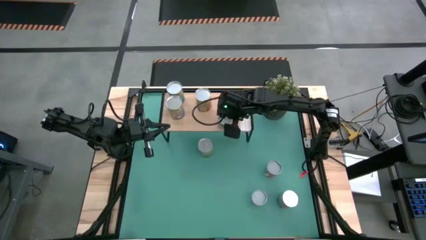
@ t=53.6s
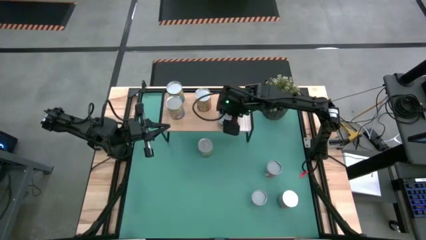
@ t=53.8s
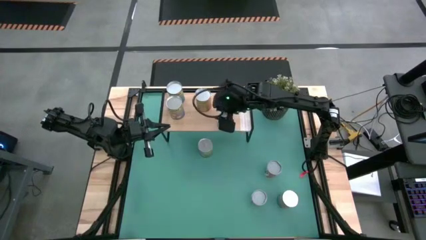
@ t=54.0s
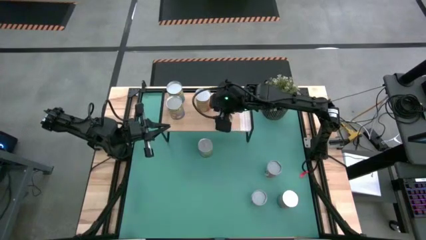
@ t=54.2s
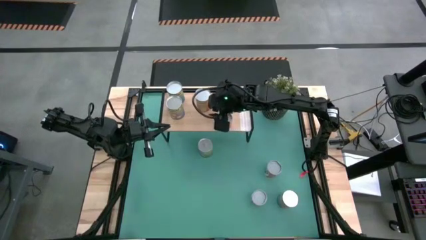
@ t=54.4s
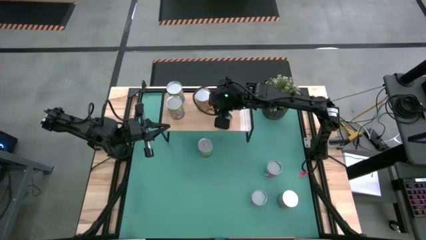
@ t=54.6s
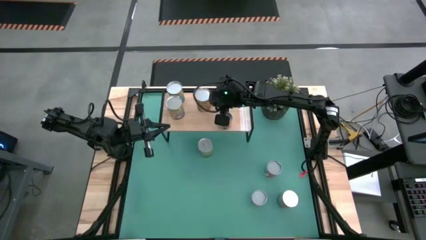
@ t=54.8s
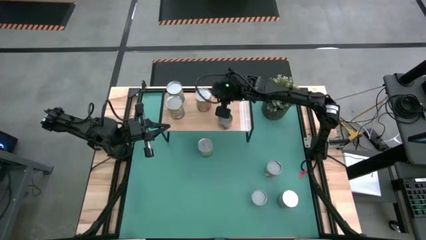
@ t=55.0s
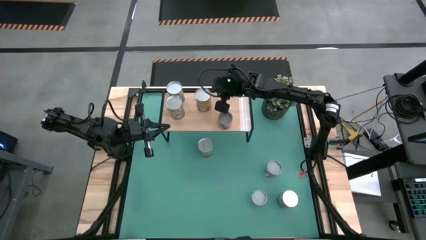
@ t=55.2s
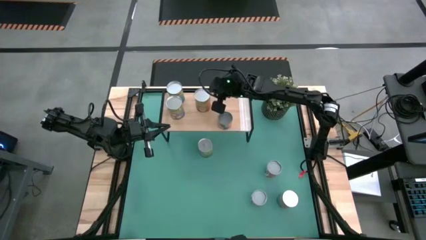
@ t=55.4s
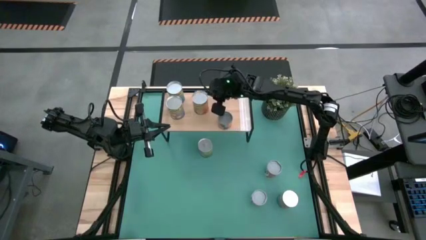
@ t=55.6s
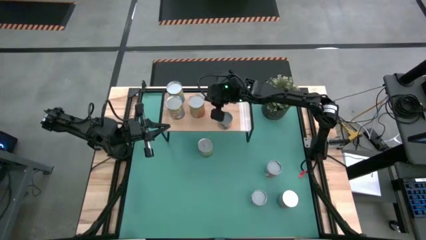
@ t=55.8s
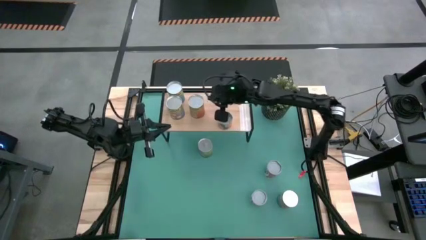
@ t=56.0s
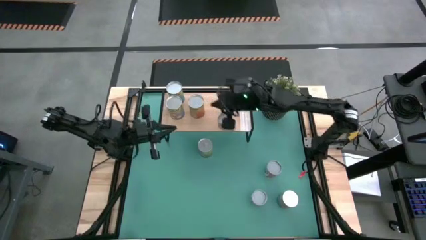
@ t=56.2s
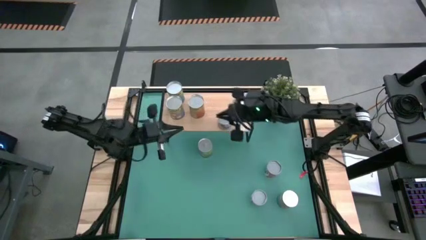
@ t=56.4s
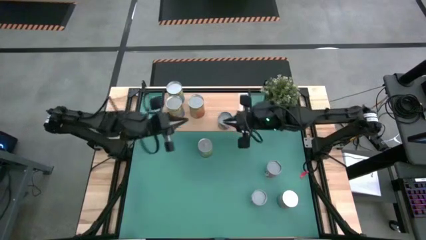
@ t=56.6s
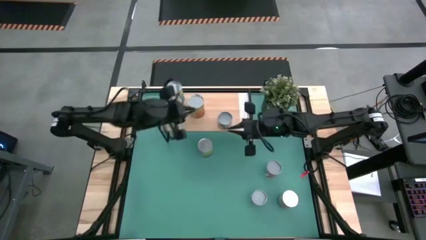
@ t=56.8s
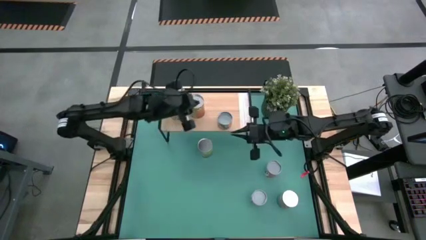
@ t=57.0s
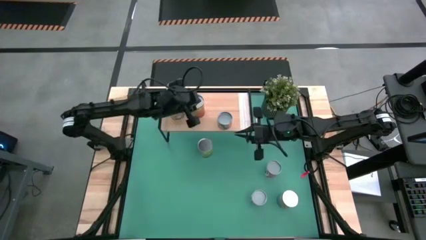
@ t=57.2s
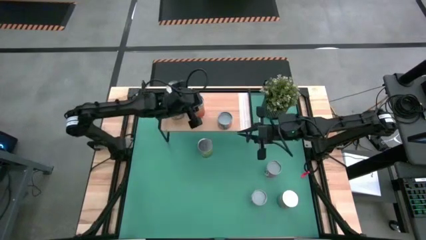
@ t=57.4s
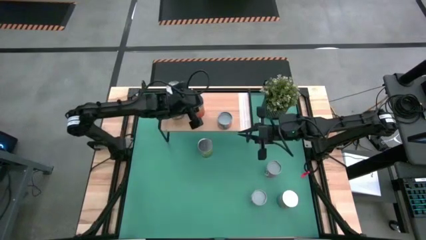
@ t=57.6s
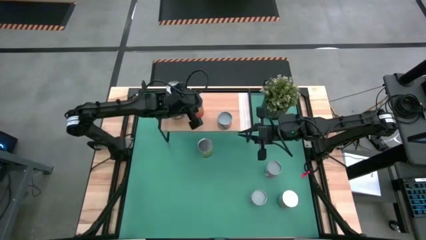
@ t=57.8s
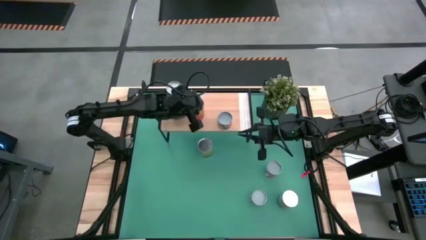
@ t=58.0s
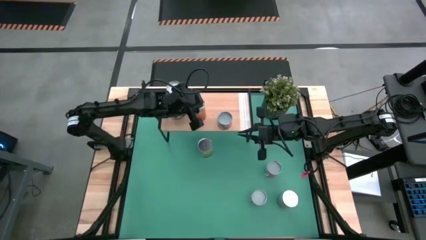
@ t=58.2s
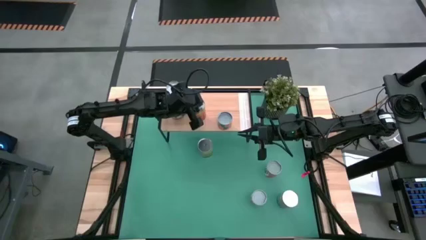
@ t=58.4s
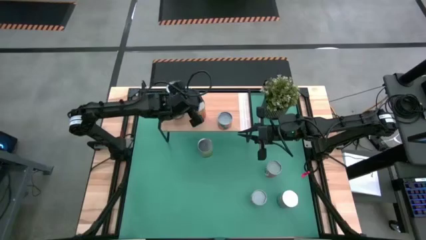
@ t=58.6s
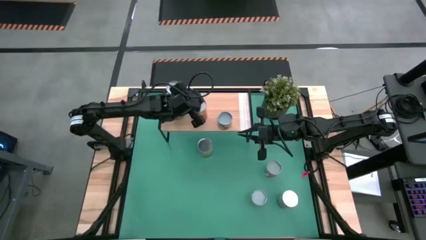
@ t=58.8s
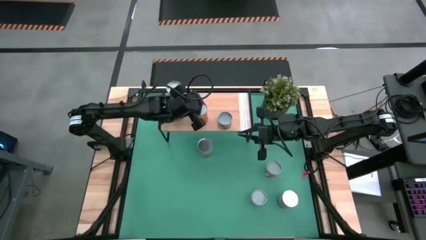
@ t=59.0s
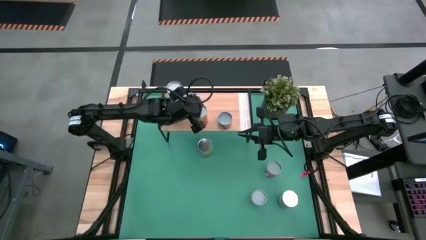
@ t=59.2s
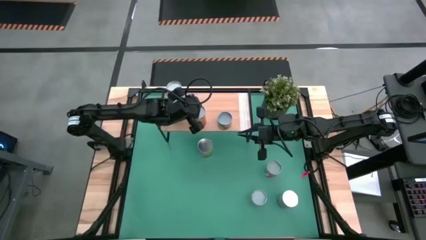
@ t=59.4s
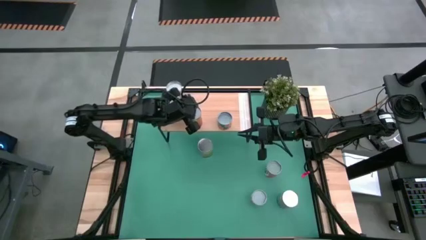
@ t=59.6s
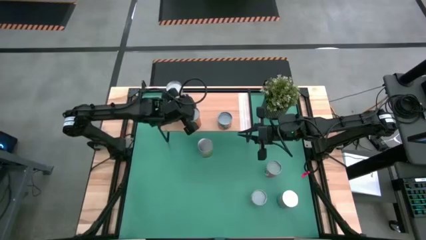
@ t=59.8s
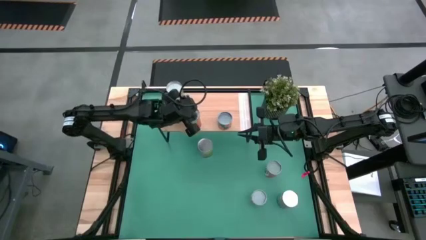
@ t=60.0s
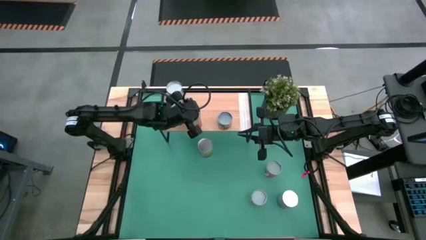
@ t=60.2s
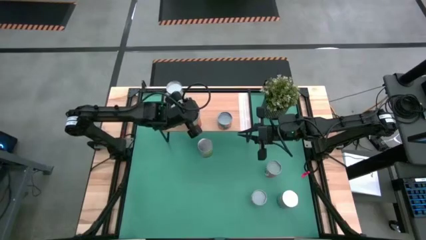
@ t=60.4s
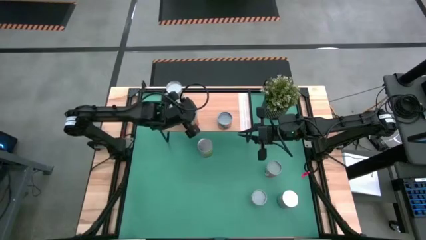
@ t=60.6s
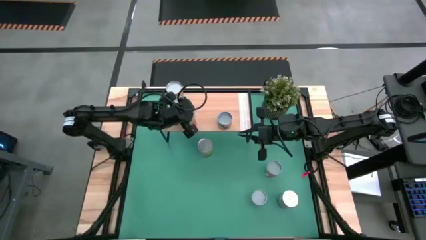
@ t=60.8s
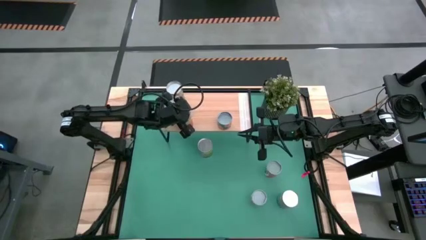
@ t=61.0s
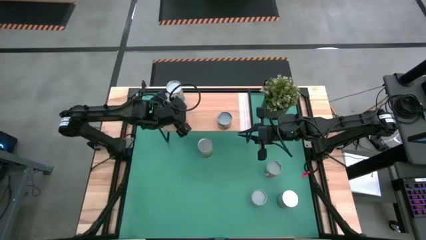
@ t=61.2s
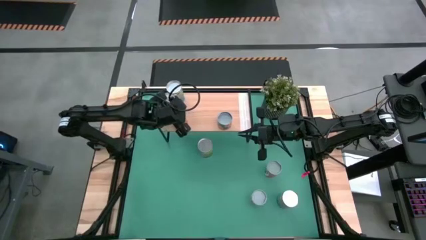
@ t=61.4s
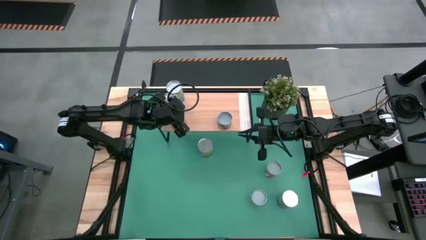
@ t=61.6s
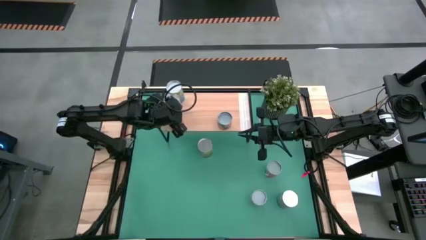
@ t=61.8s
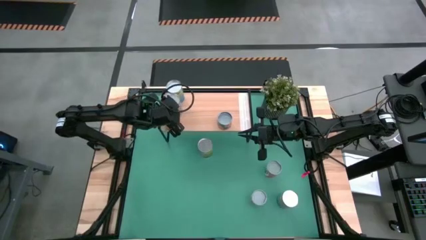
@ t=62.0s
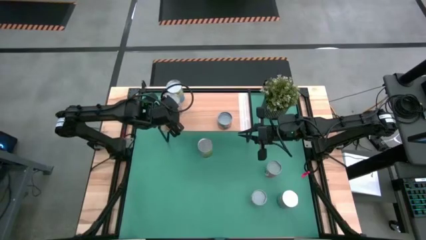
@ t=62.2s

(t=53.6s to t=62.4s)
Task: Pick and place cans onto a shelf
Adjust the canned pineapples

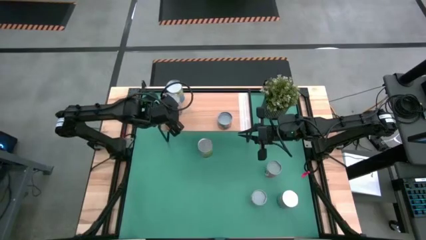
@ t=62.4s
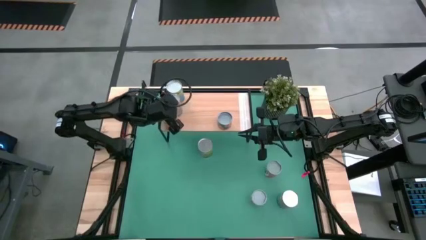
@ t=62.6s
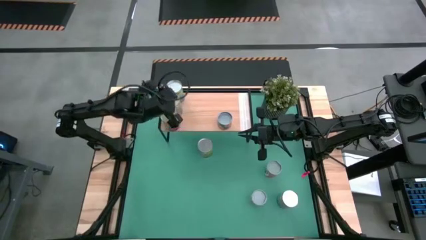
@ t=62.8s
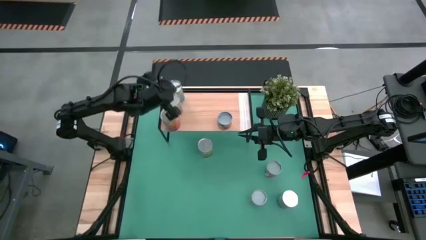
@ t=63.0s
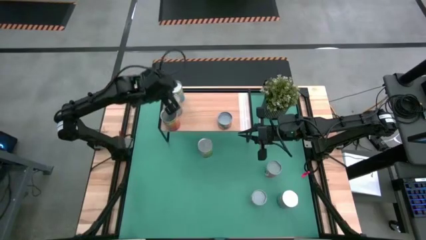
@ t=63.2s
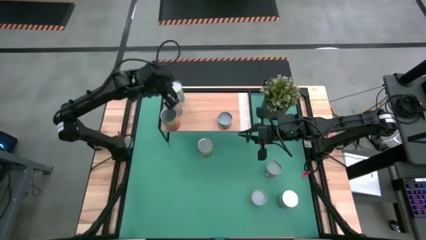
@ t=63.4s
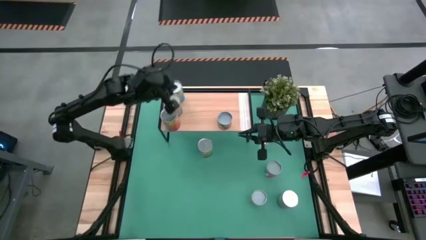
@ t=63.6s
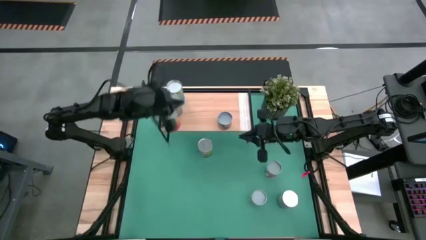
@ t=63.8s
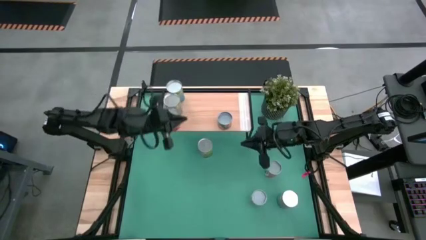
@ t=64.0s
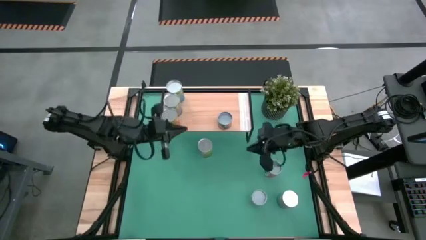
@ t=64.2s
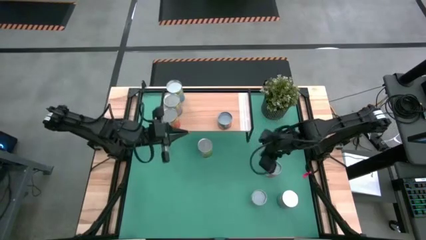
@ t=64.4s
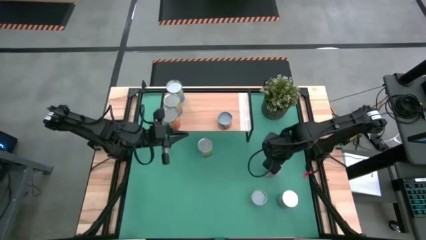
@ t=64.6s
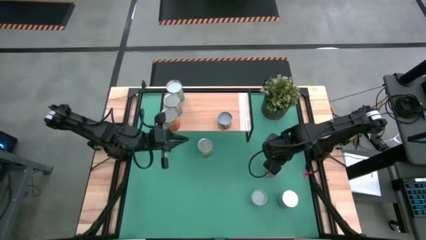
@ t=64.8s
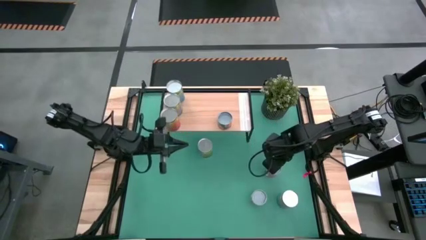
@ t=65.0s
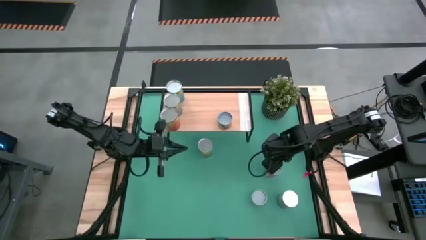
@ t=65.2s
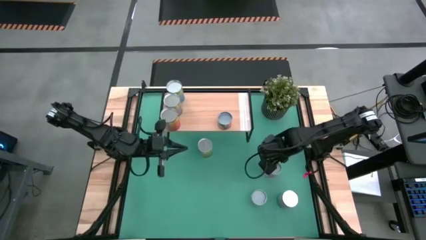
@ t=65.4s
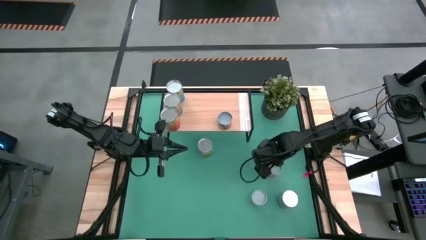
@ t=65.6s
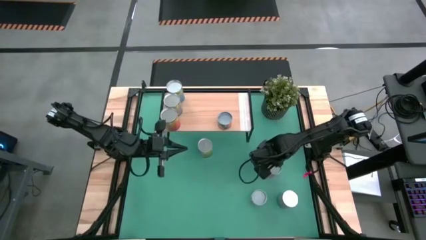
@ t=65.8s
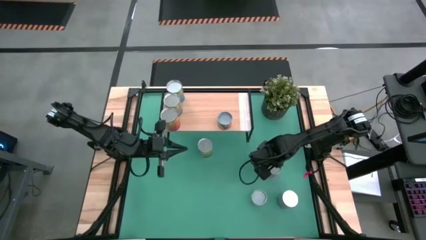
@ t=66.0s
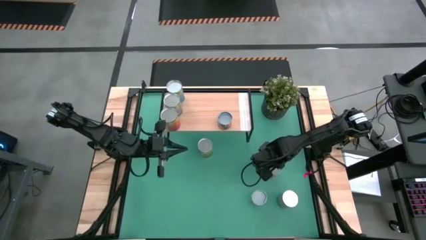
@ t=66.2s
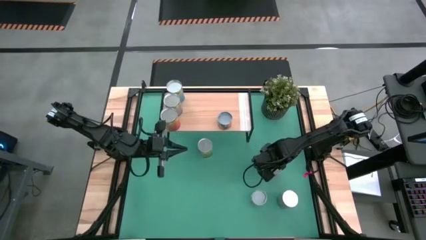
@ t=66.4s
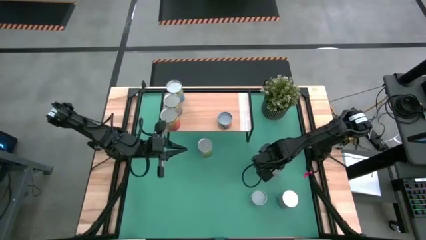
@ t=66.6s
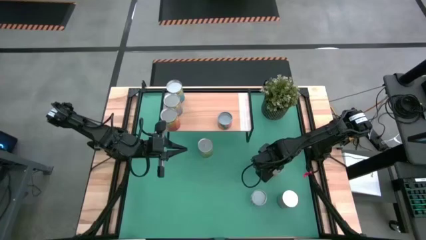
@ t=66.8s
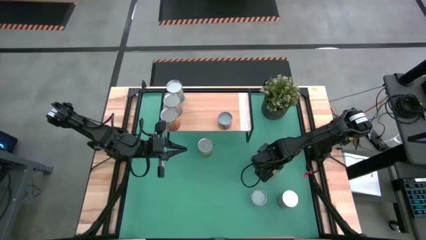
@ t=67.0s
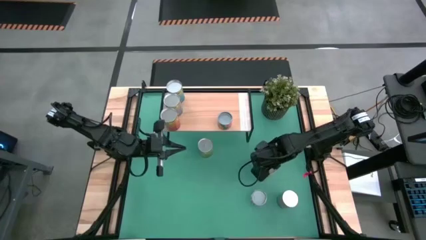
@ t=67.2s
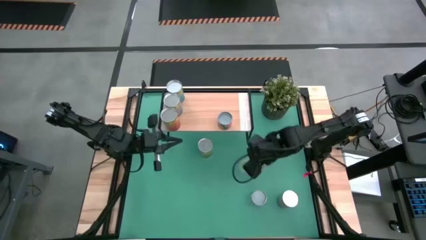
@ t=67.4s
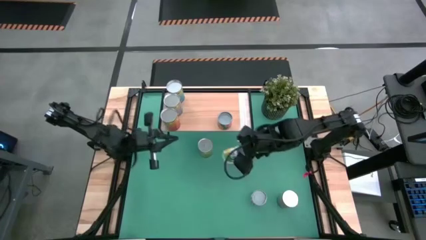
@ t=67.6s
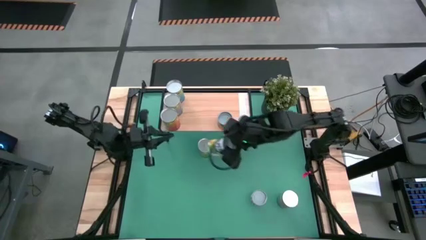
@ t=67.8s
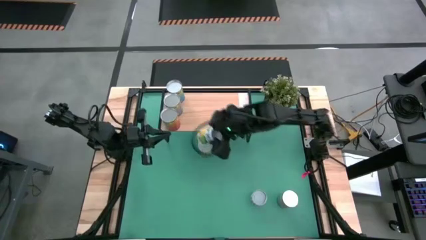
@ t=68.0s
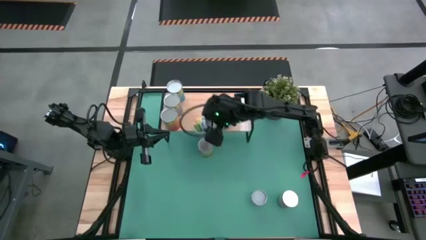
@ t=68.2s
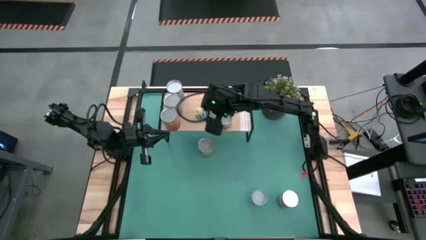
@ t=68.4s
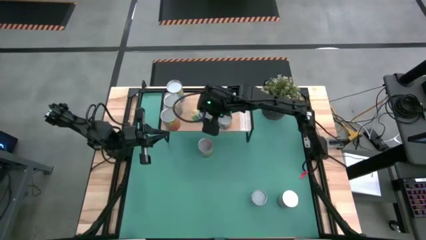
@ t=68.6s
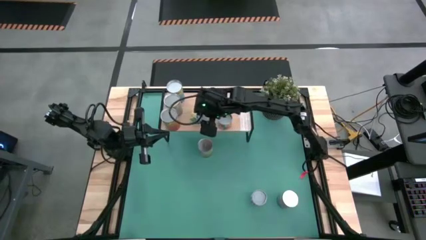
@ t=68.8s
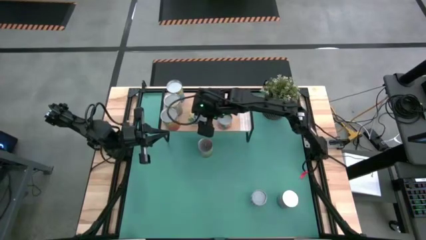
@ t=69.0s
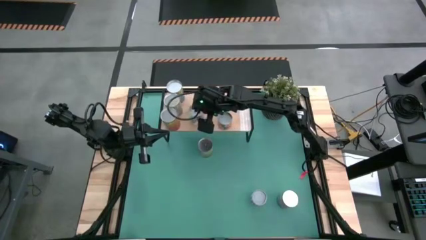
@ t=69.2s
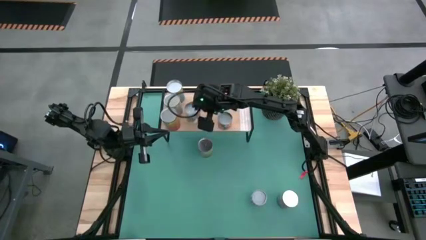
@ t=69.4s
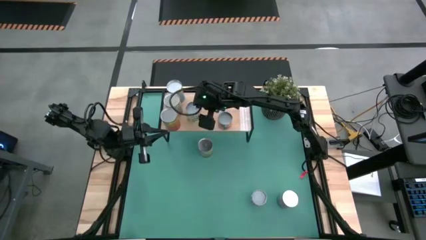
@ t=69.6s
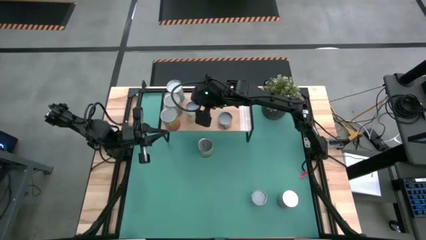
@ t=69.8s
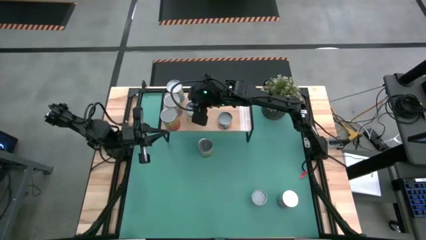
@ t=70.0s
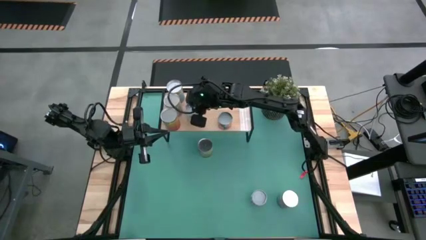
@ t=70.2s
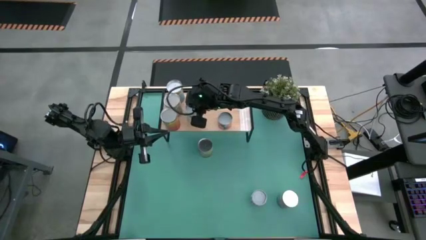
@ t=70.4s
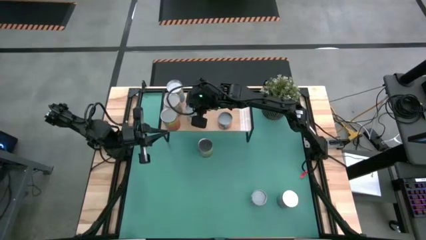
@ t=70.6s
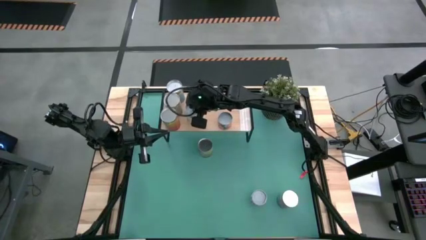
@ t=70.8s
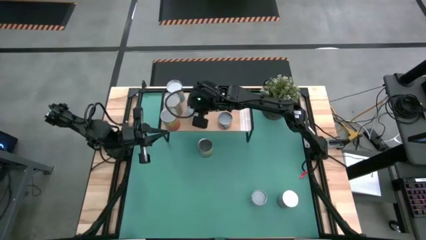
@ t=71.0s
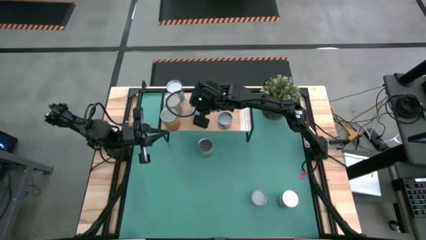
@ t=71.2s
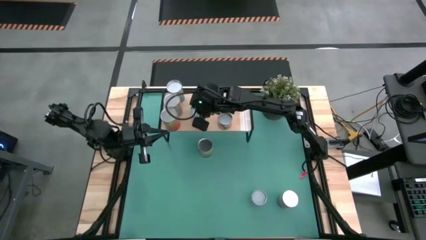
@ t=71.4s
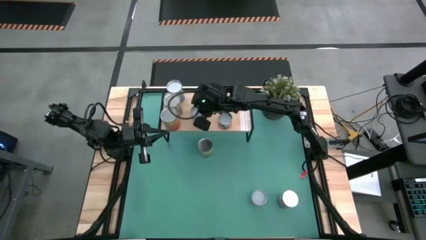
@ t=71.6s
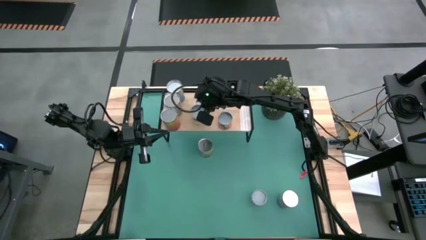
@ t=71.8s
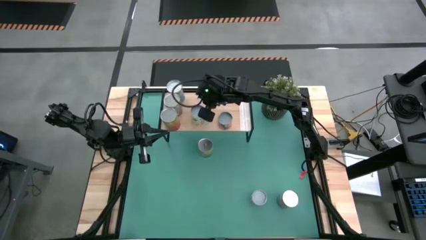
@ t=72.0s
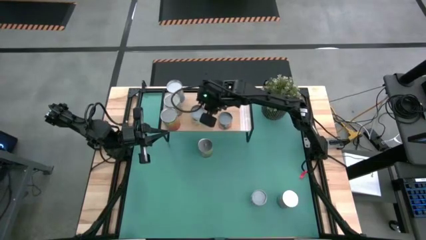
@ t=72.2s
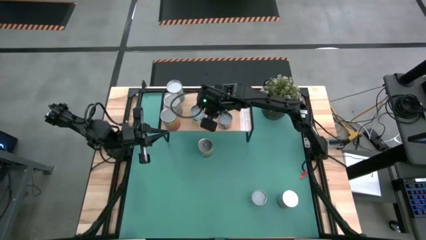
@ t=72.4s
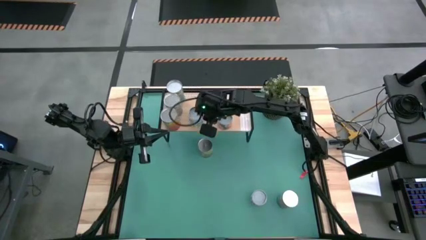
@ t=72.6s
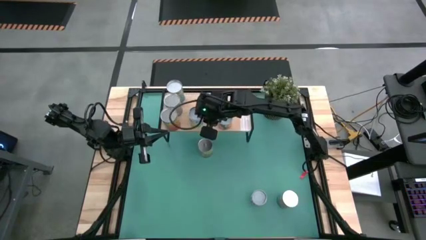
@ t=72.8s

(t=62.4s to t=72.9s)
Put the canned mixed fruit on the shelf
